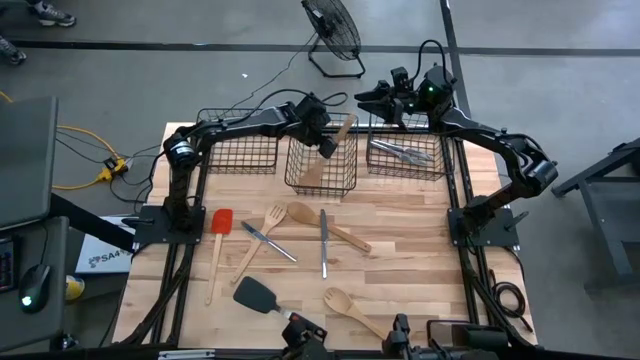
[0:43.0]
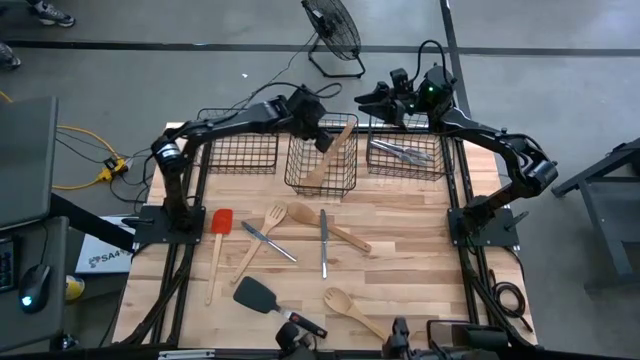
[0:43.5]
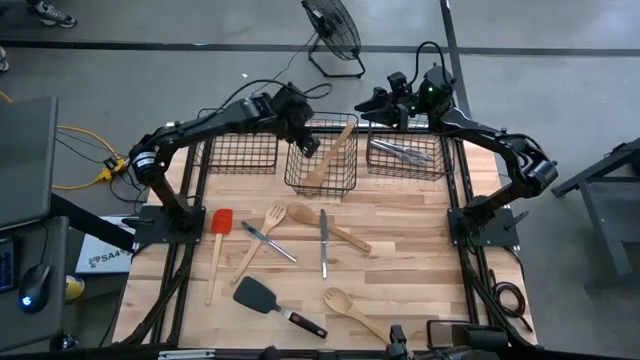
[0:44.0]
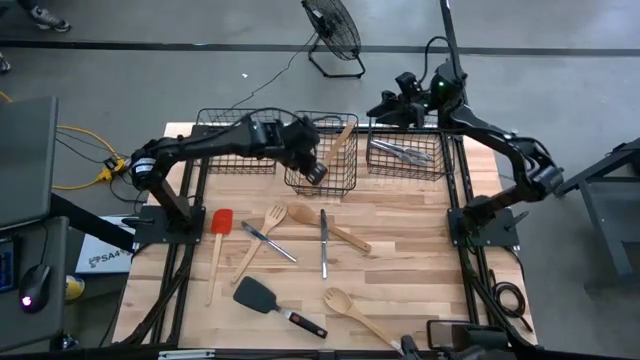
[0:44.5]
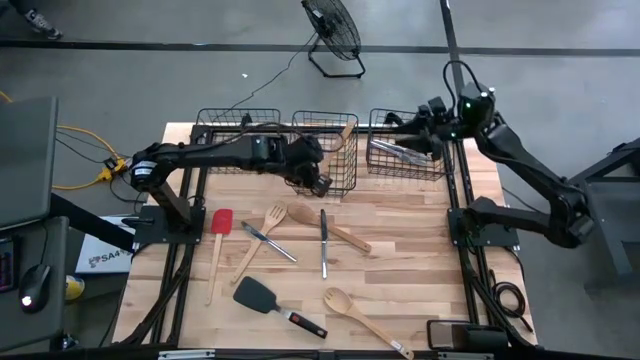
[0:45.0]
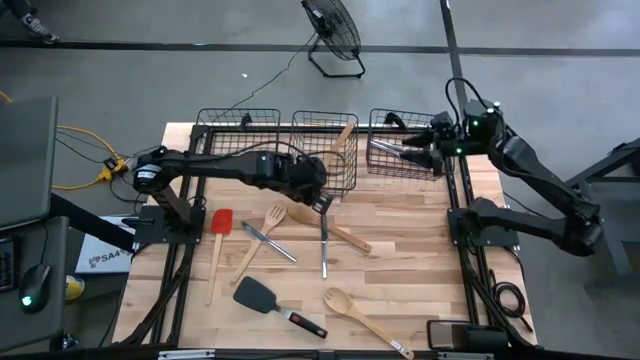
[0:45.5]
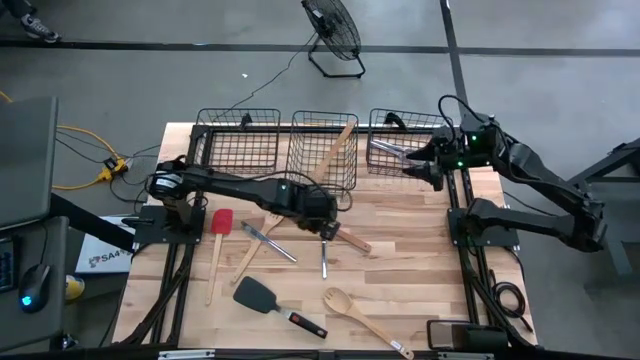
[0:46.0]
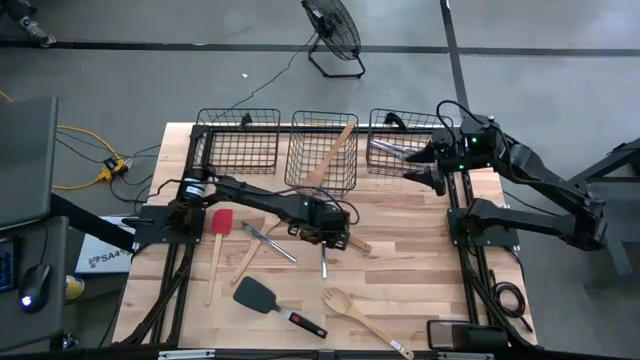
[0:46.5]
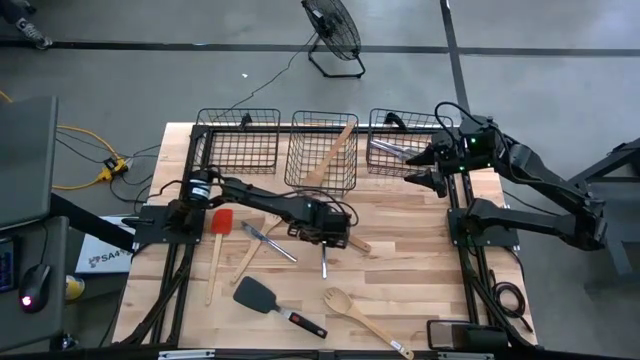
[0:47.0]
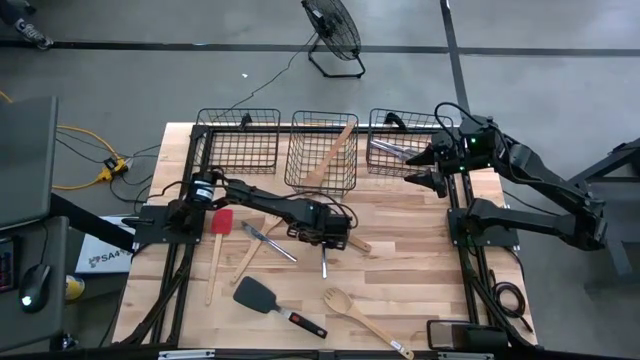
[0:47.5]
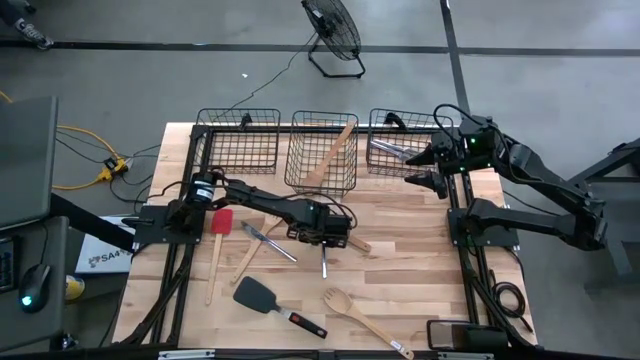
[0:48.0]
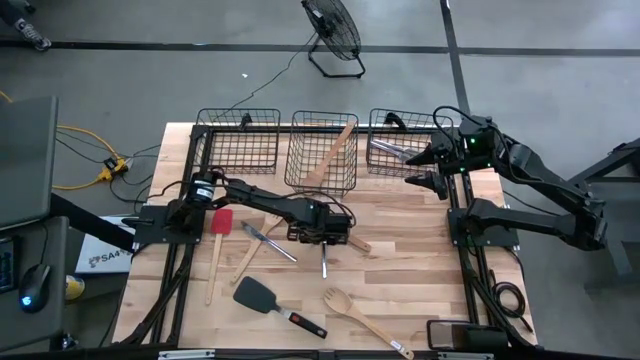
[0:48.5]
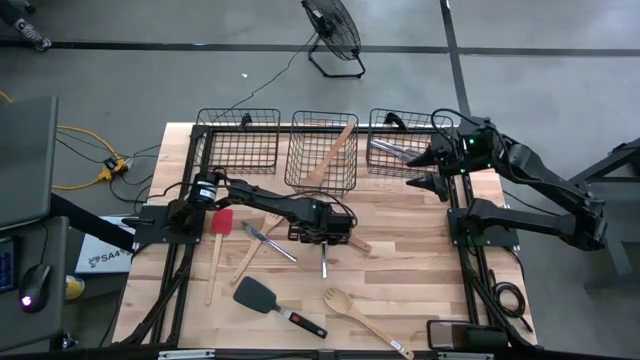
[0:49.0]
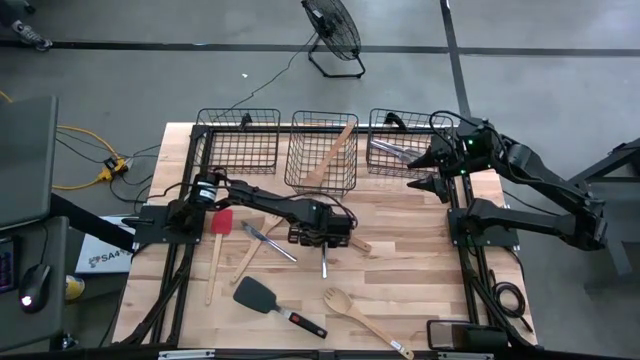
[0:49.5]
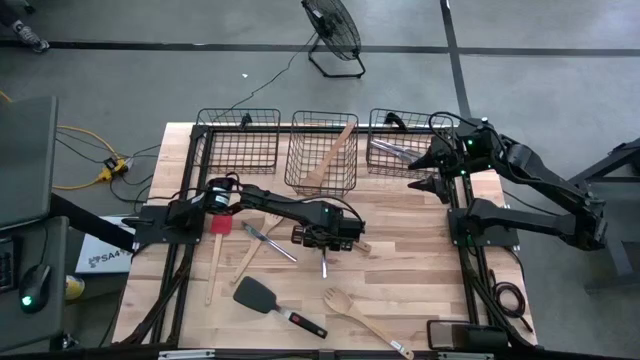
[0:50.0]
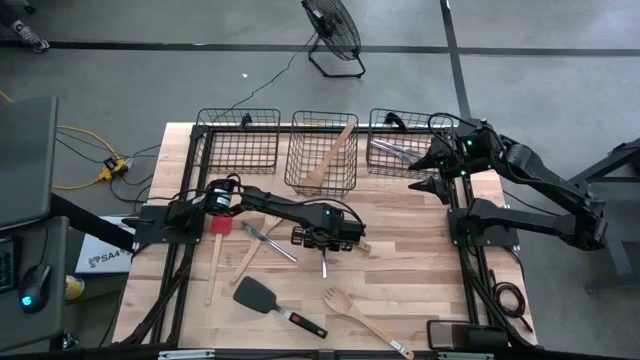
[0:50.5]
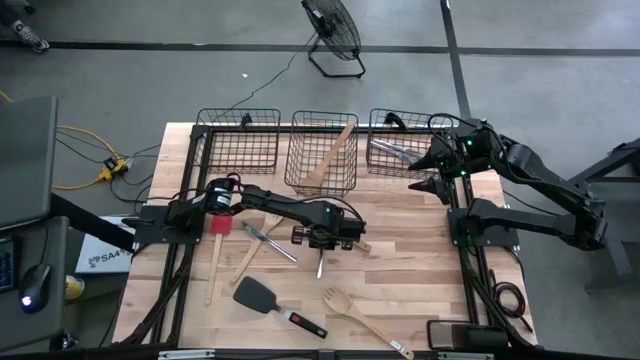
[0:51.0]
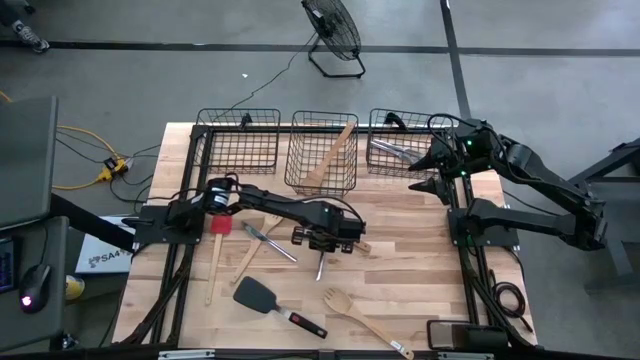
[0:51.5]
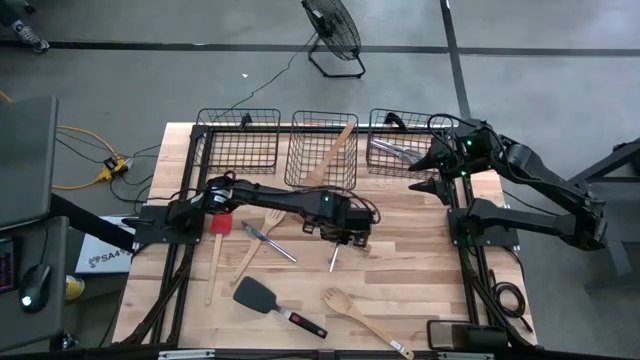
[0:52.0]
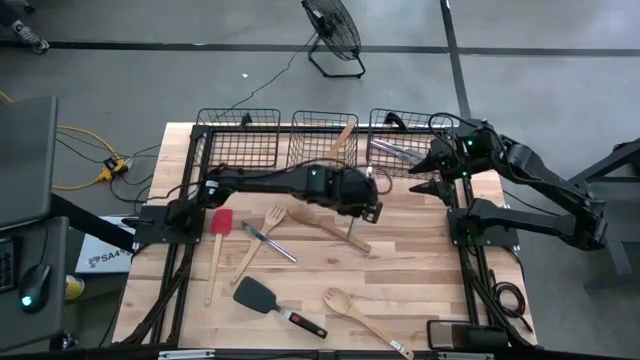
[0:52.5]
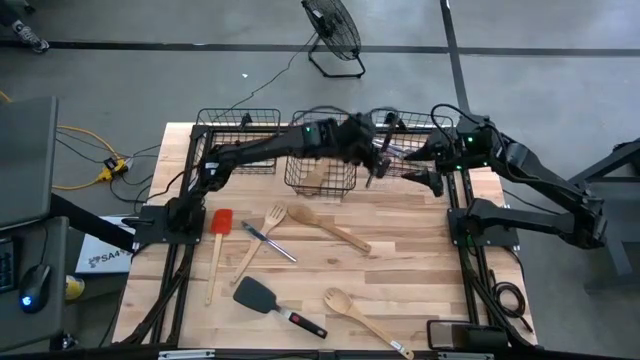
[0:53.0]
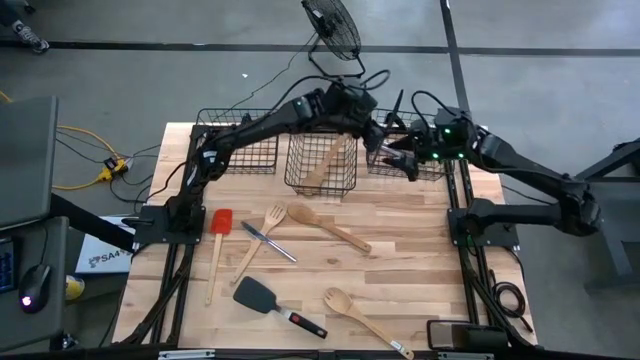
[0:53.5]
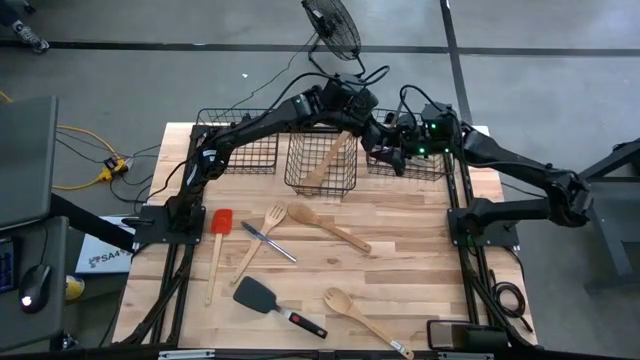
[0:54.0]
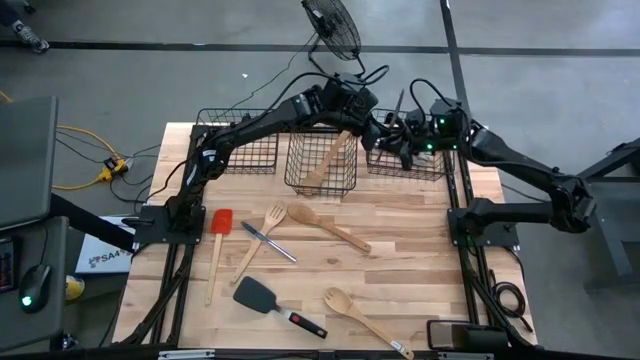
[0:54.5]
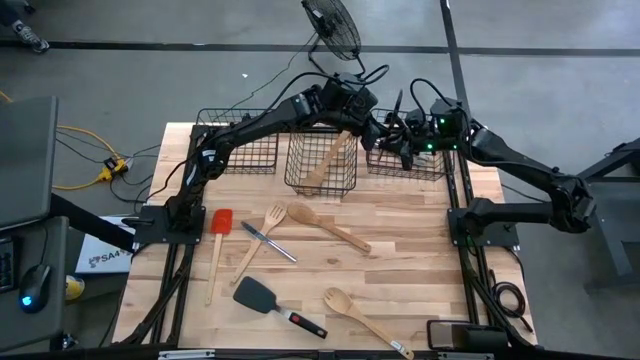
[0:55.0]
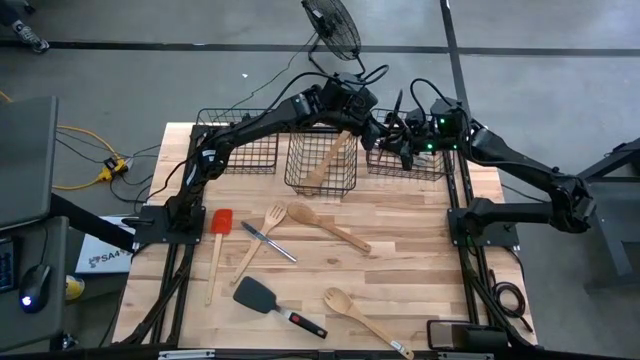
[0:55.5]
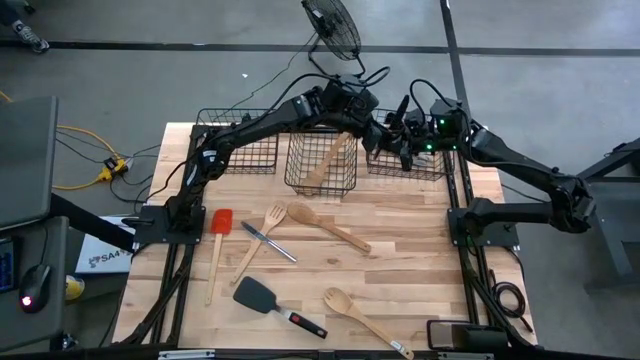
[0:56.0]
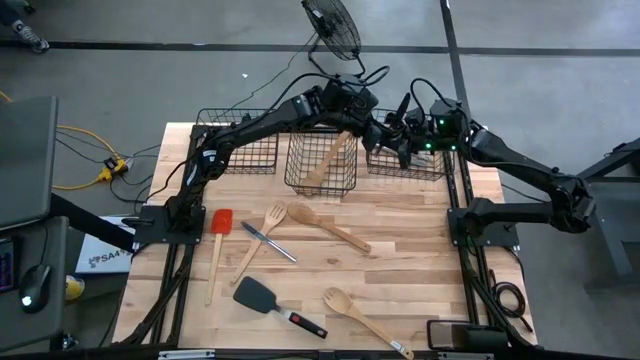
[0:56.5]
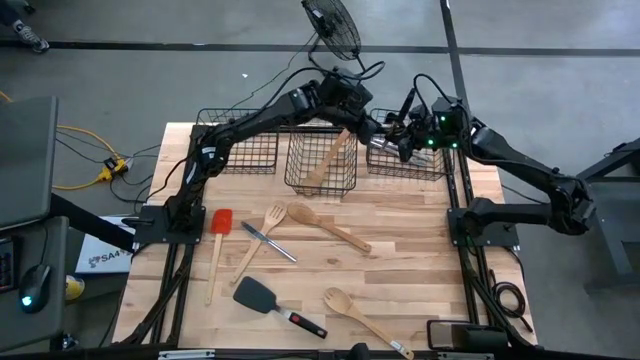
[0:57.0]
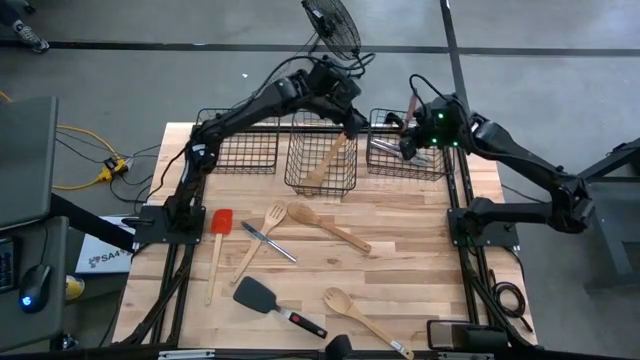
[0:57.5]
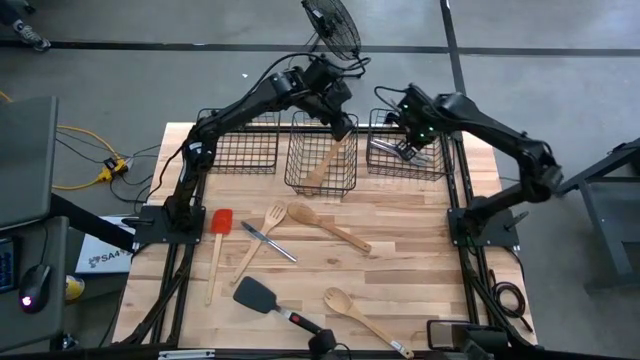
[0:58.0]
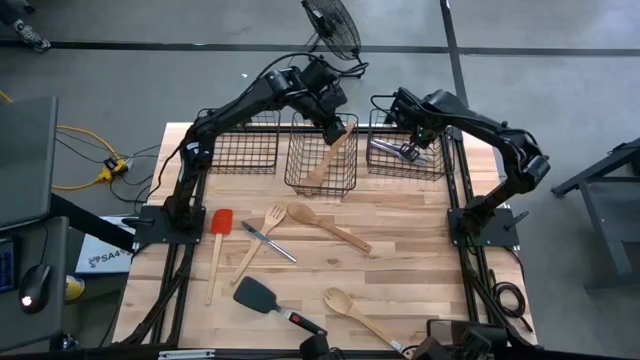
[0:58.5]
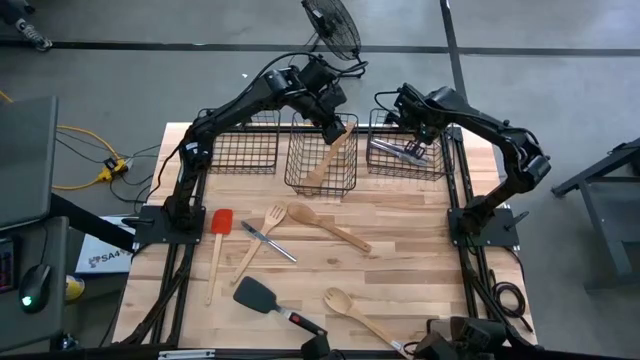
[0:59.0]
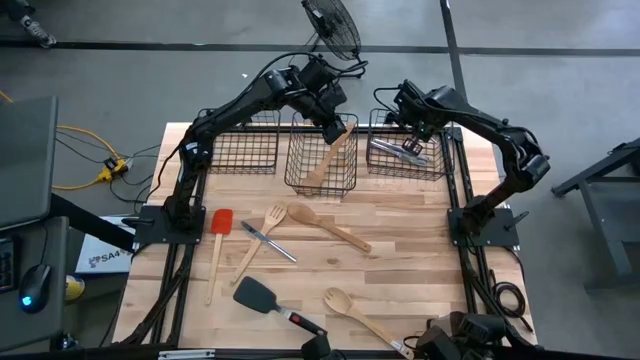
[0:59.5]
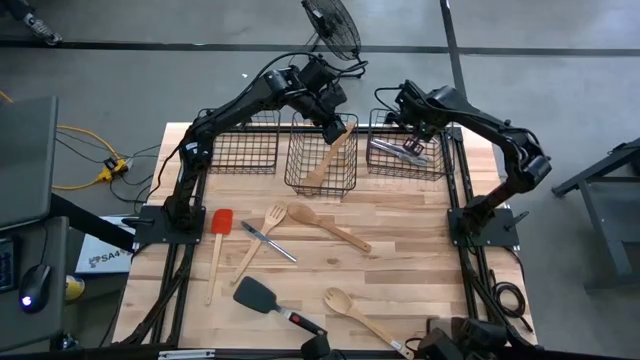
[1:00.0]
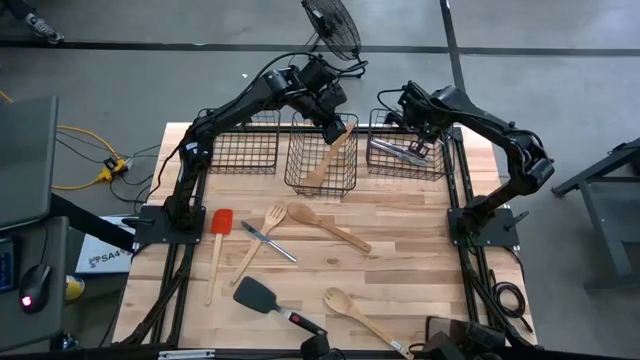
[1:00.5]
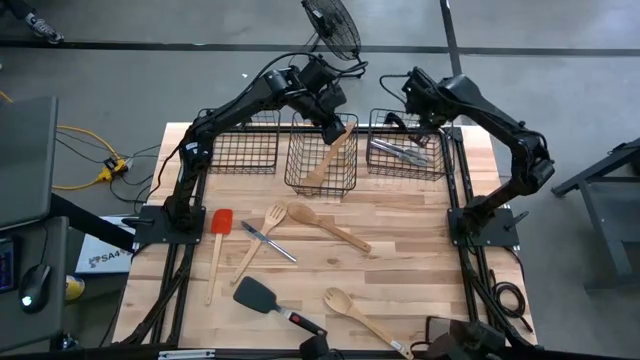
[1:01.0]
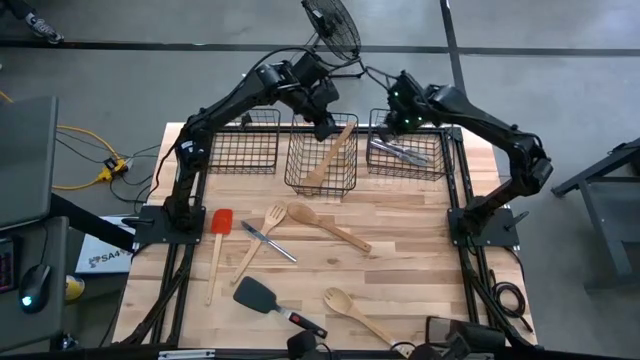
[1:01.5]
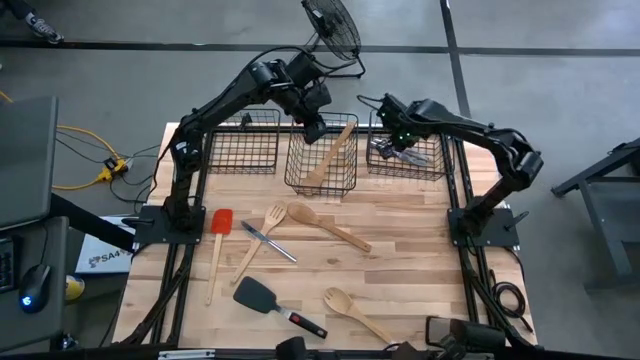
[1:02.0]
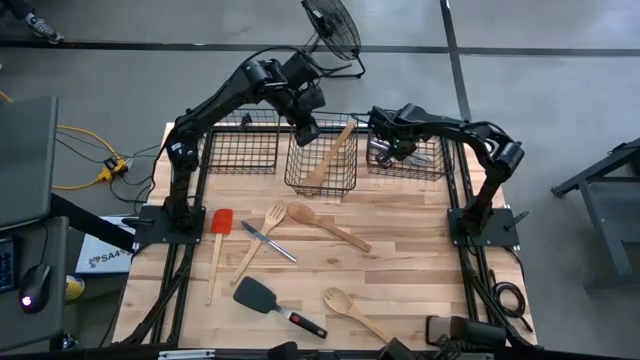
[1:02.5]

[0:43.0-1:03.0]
Task: Pick & Place Kitchen Items
Put the silver table knife into the right wire basket

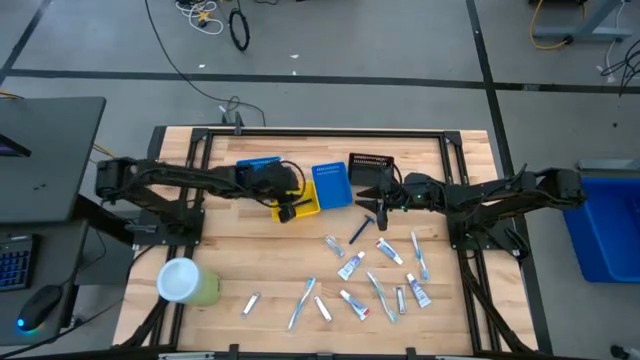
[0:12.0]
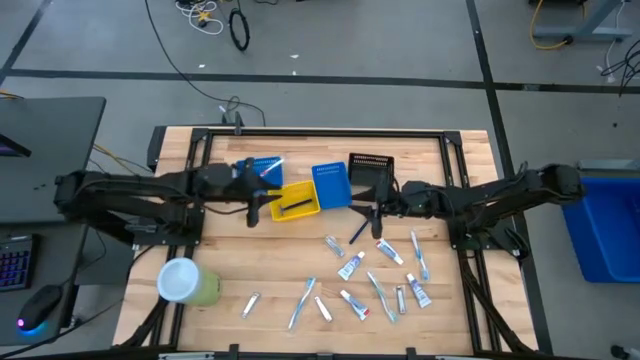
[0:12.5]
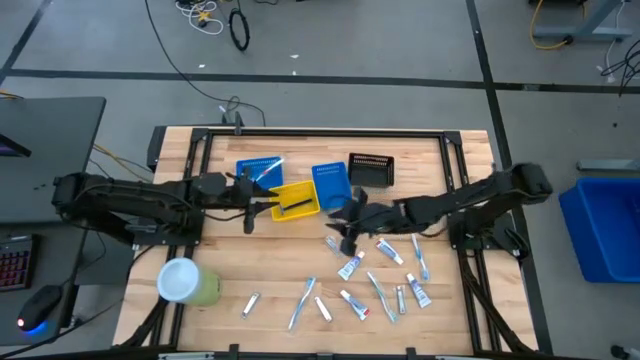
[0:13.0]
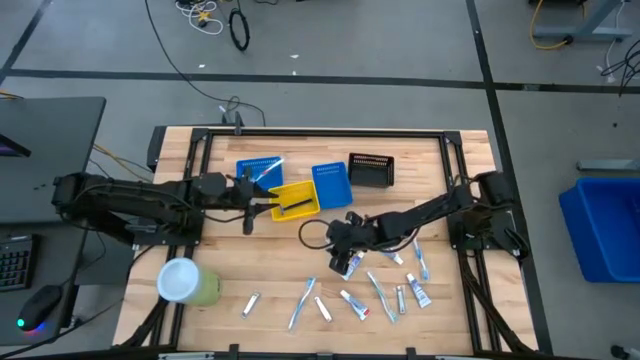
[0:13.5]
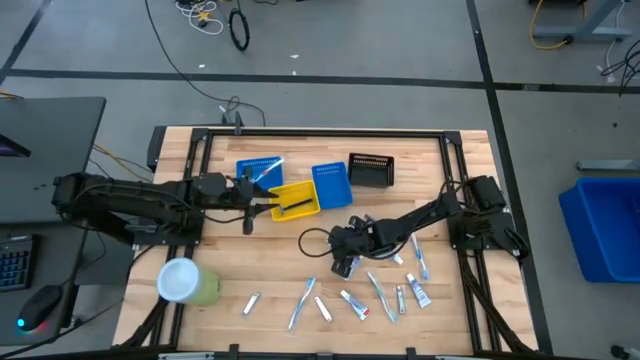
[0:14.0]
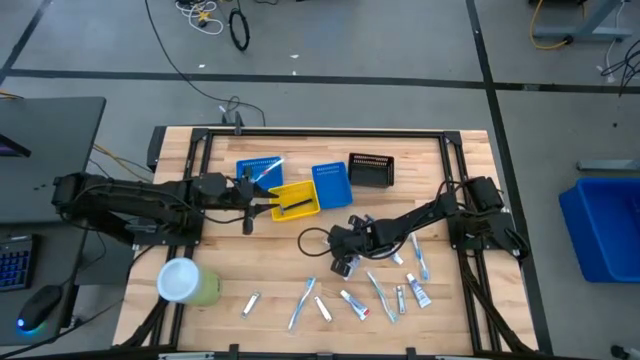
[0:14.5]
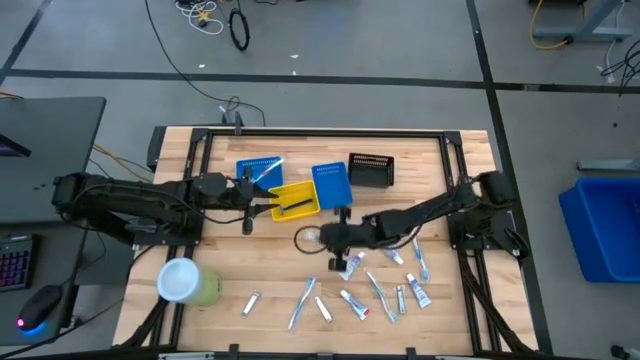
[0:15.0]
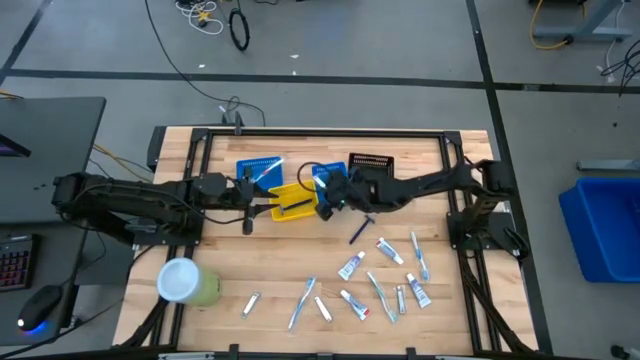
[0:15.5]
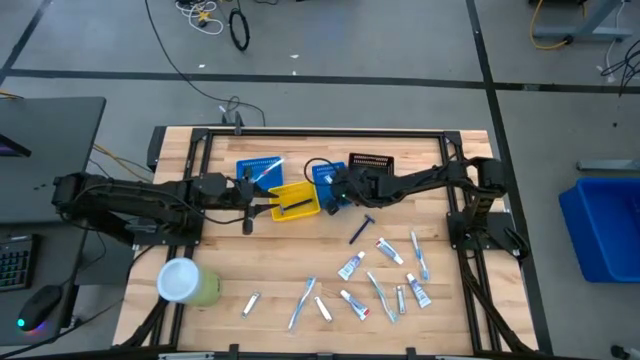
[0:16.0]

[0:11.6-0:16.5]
Task: Pick & Place Travel size toiletries
Put the nail cutter into the right blue bin
